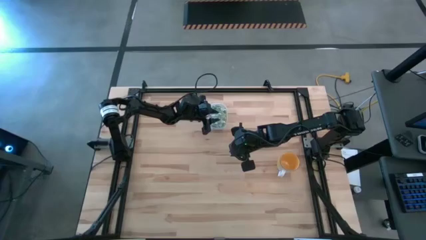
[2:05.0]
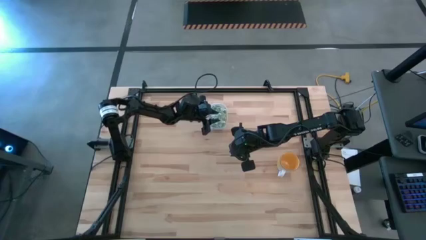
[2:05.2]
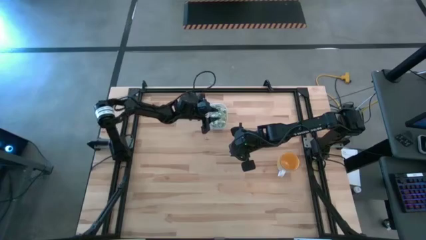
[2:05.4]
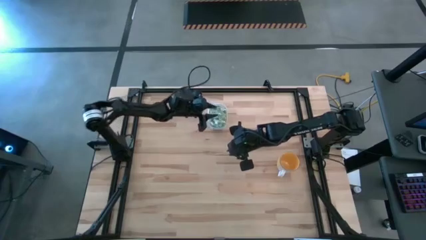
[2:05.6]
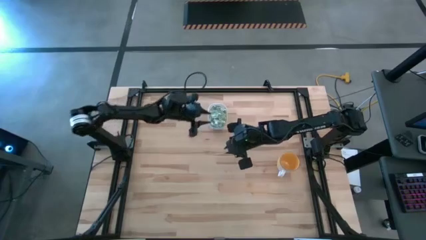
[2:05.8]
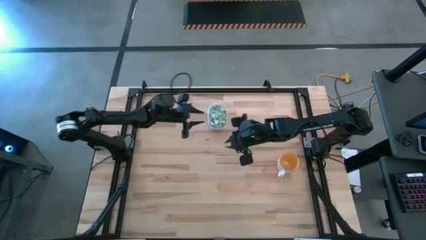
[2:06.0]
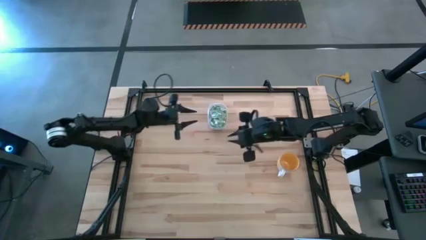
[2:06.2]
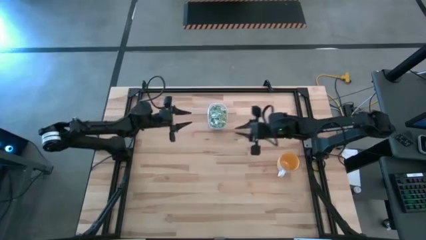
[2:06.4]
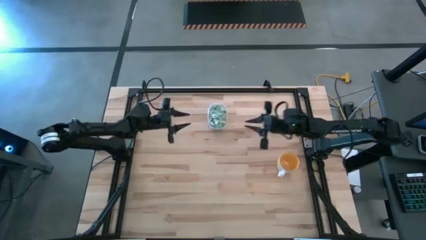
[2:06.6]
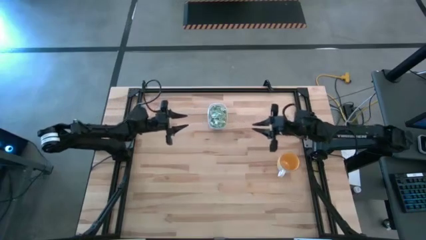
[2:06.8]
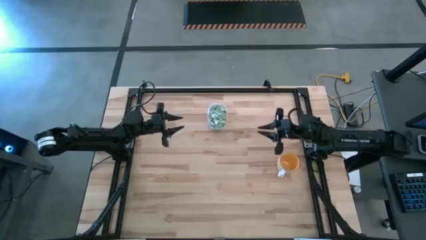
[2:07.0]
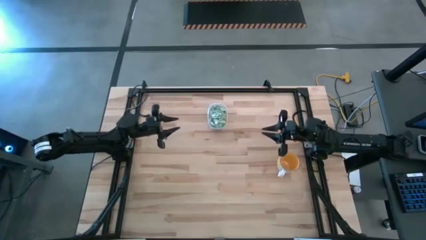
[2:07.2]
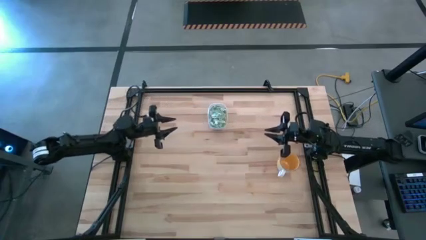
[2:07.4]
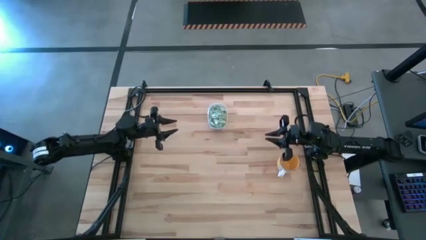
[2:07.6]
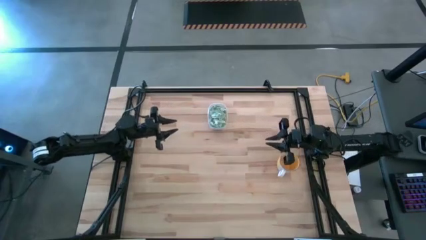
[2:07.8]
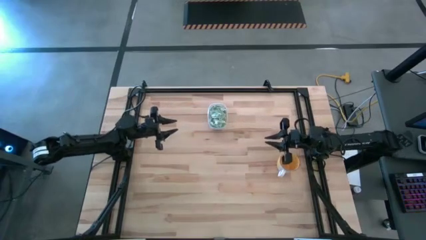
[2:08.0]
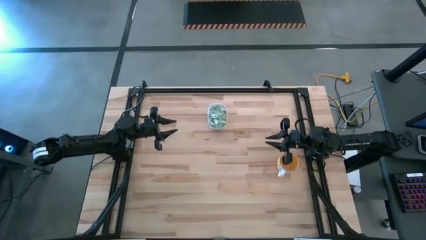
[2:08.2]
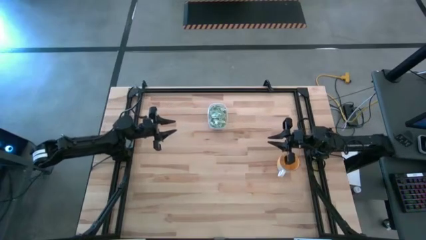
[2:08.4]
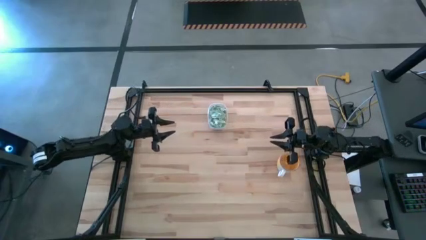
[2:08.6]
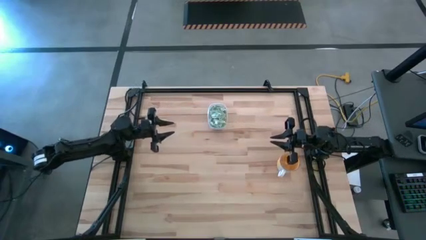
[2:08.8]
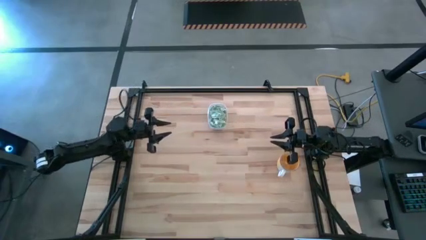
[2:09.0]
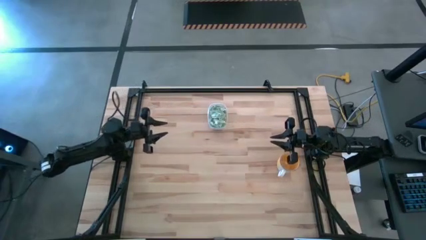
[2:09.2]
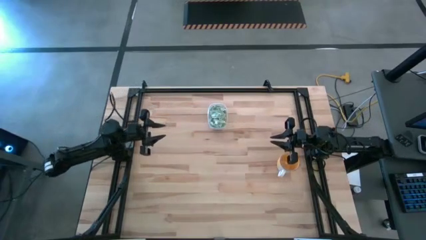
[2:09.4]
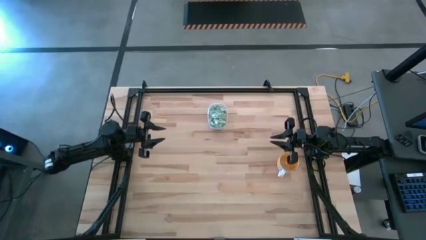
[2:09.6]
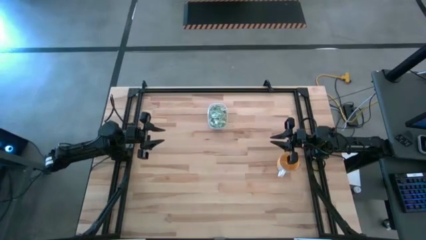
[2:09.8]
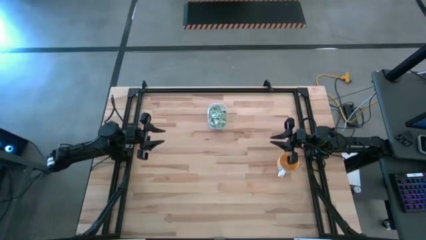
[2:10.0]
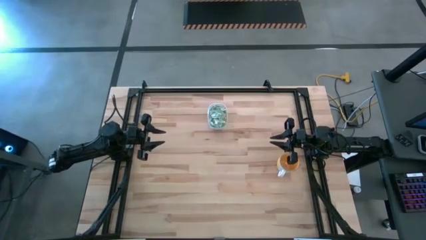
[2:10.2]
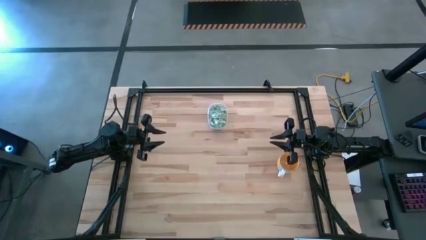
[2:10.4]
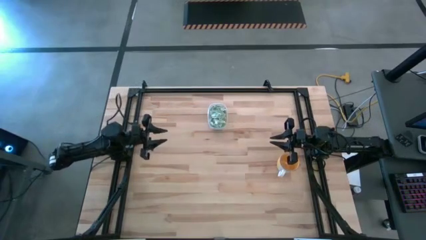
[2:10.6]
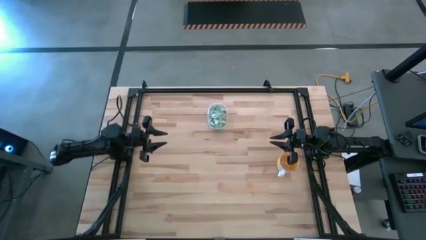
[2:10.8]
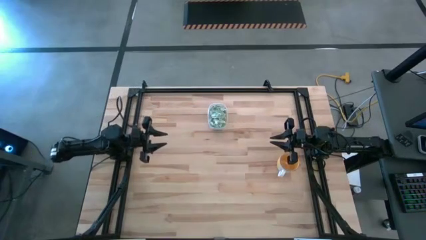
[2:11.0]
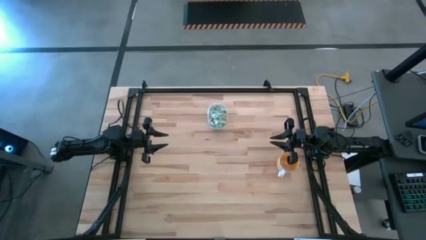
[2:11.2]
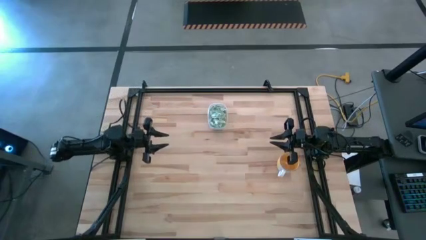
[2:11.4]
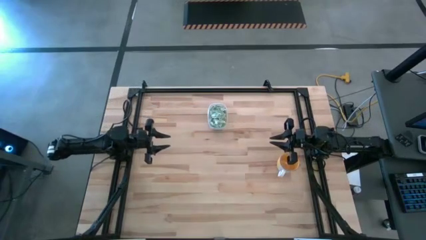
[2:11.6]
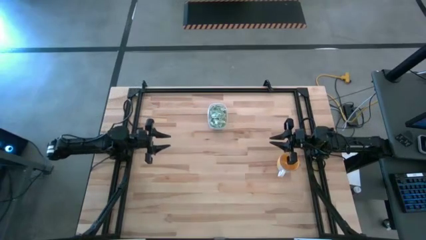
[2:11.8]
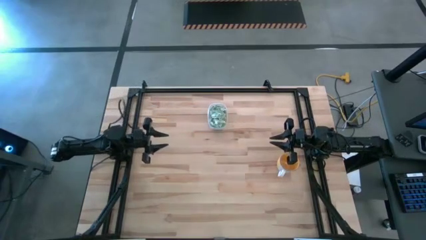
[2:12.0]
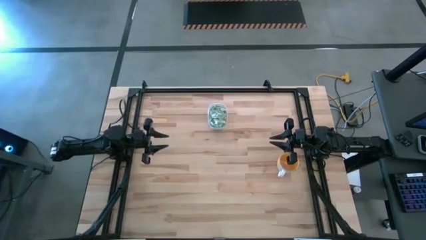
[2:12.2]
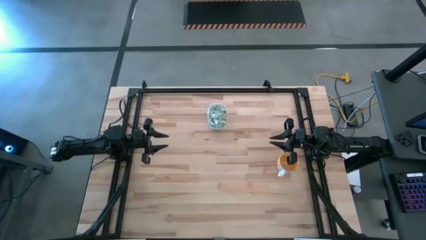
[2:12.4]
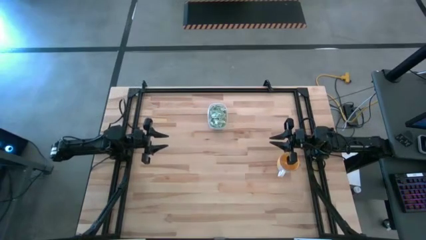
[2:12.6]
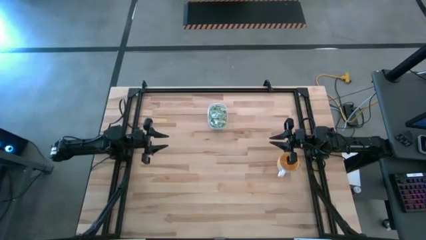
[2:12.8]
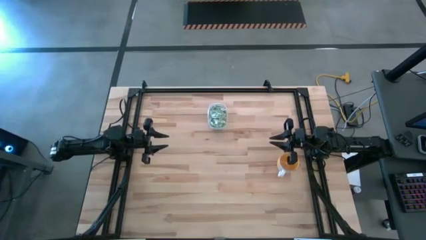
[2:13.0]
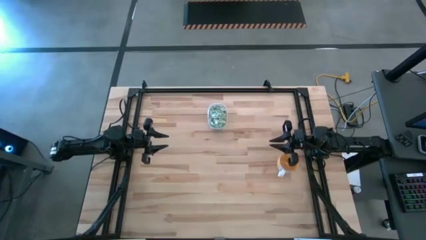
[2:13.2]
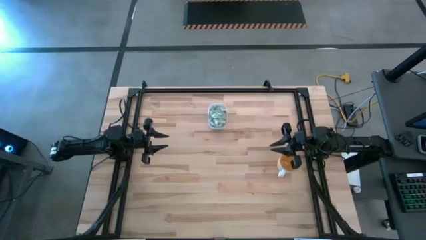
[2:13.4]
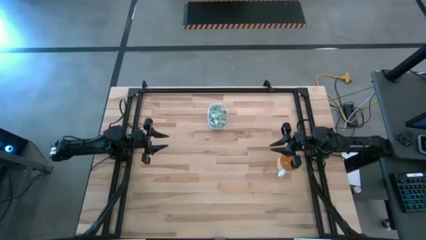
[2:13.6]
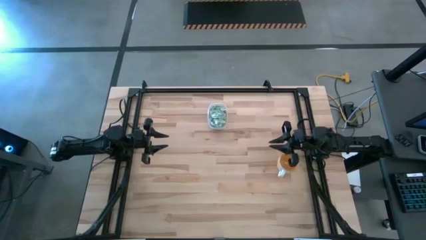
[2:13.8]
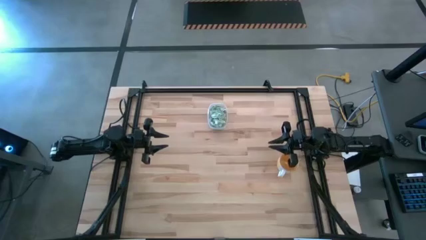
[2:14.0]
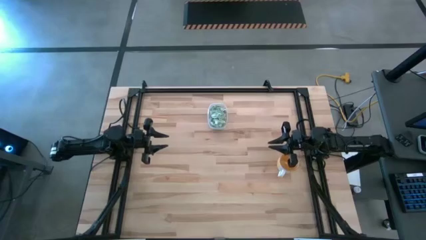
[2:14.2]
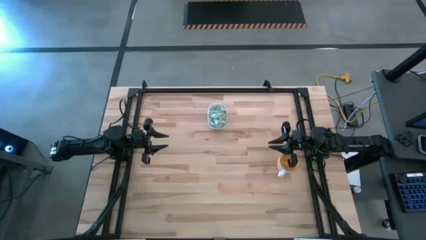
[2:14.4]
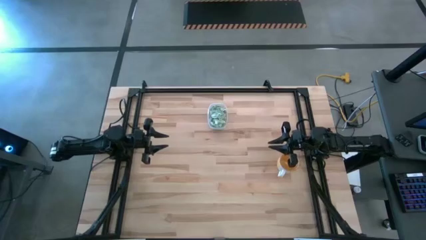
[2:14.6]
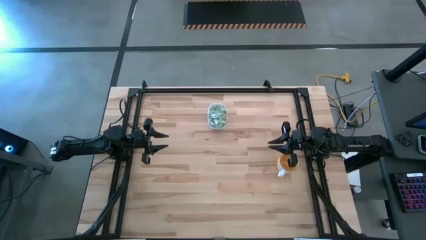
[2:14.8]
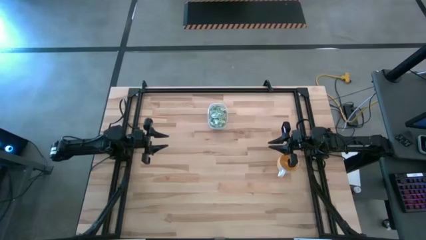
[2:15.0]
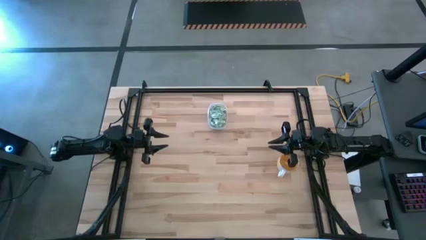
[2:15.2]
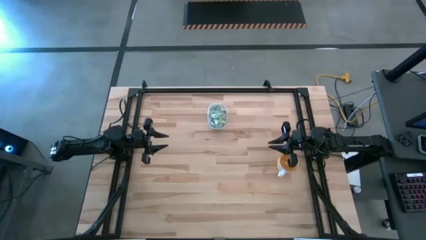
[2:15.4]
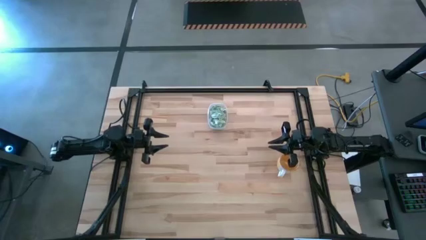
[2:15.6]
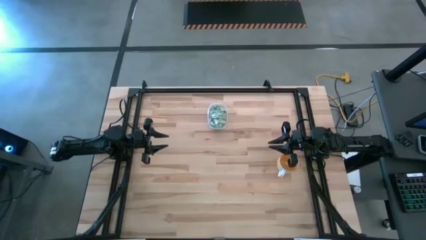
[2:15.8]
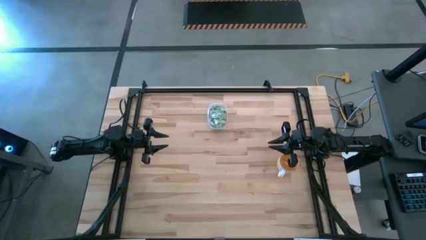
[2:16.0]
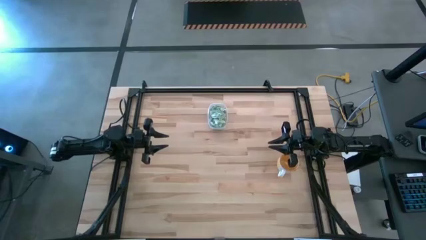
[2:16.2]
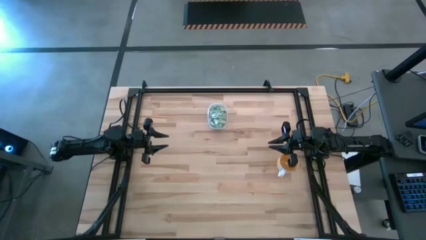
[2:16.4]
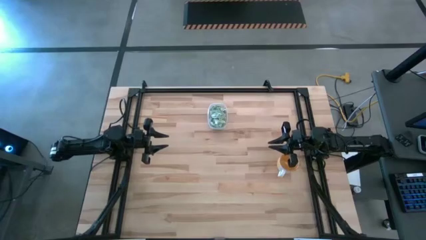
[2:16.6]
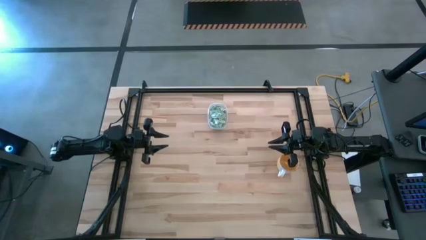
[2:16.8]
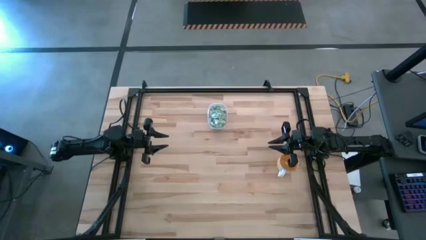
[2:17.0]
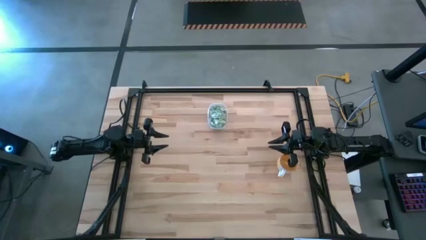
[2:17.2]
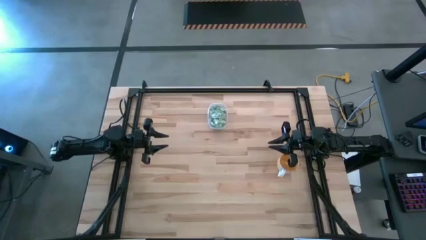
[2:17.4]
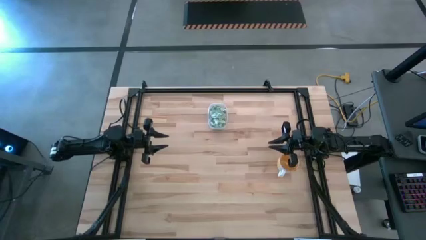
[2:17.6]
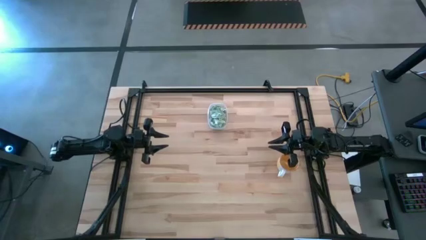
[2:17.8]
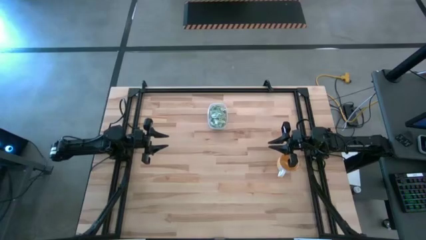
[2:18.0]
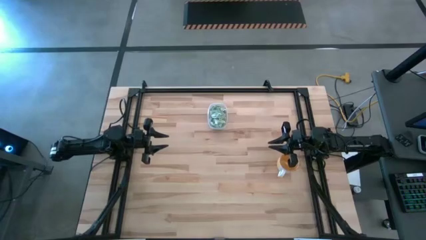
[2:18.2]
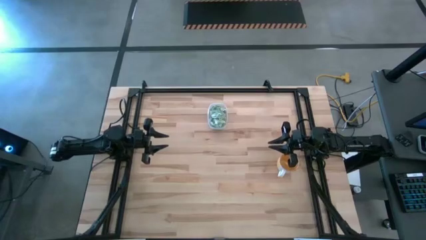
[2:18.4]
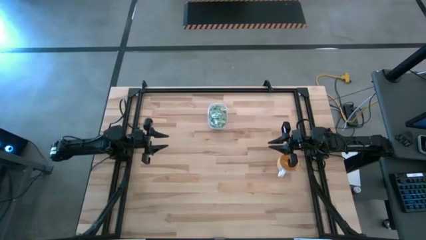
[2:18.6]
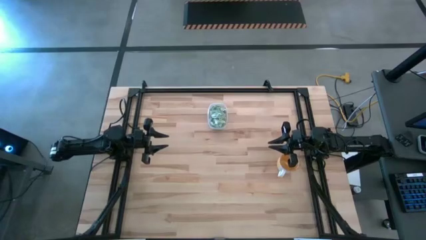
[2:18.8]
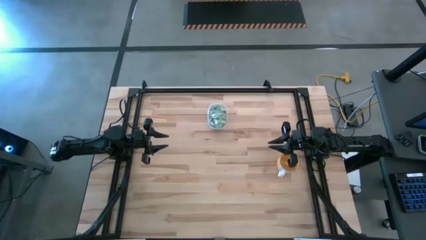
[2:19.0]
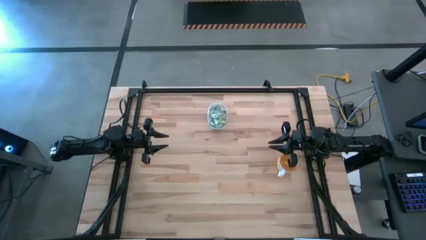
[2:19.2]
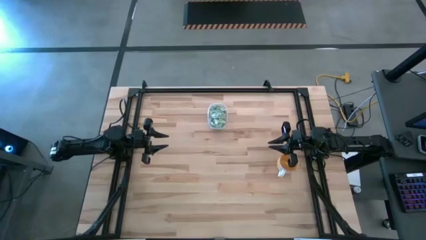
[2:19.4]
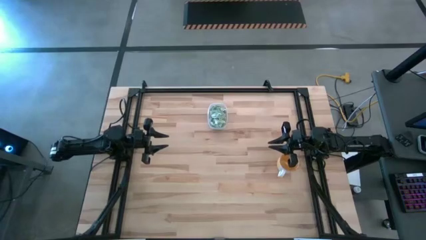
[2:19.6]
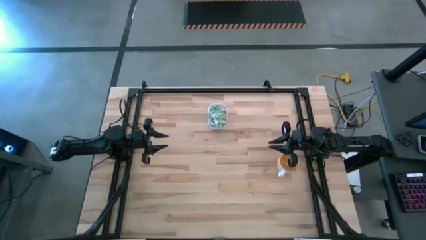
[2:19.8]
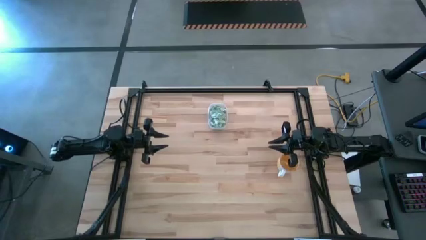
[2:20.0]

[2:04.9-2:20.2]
Task: Pick and place Stevia / Truvia into bins
Return to Home Position

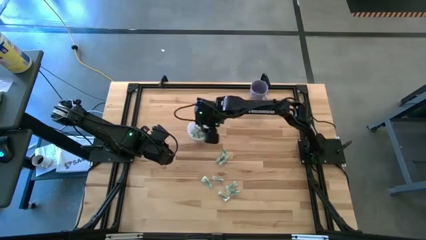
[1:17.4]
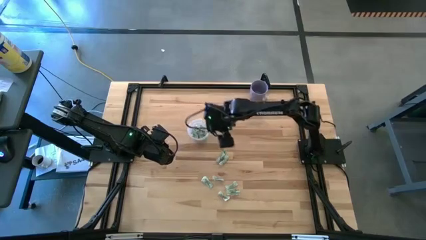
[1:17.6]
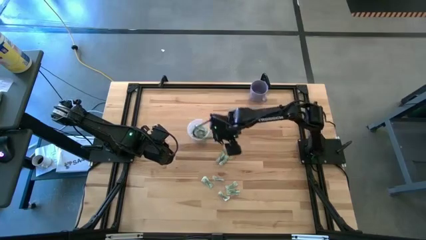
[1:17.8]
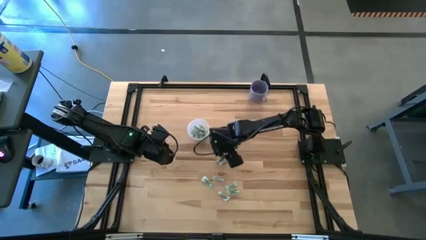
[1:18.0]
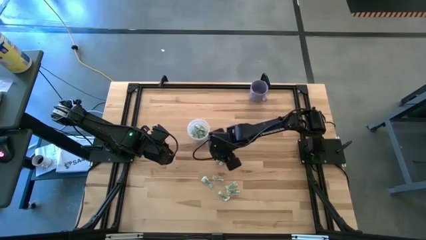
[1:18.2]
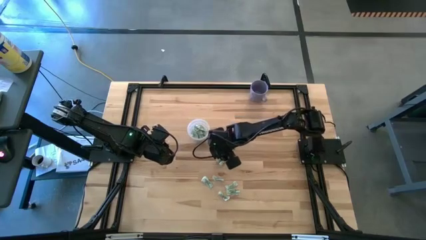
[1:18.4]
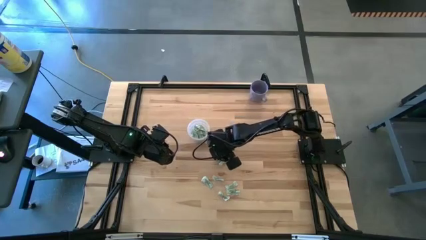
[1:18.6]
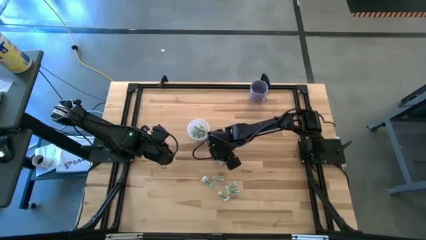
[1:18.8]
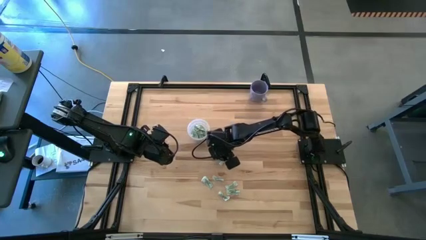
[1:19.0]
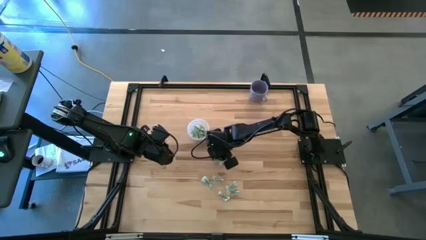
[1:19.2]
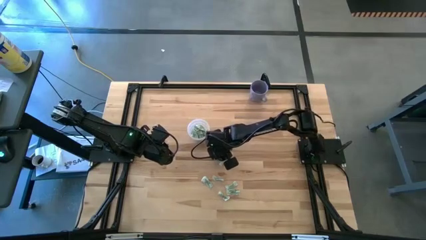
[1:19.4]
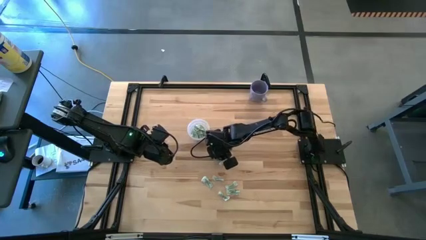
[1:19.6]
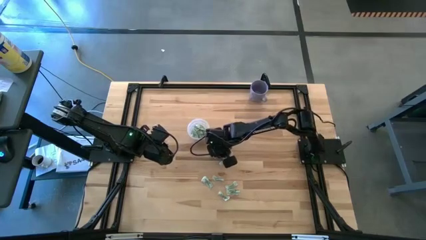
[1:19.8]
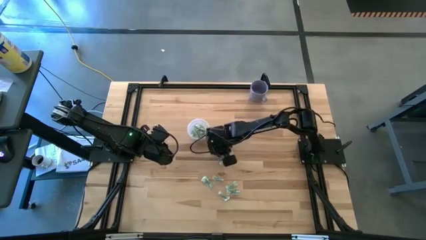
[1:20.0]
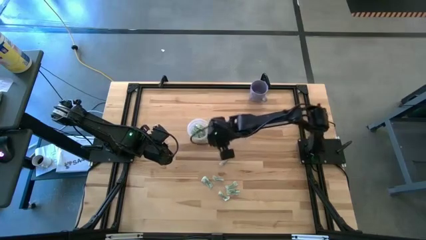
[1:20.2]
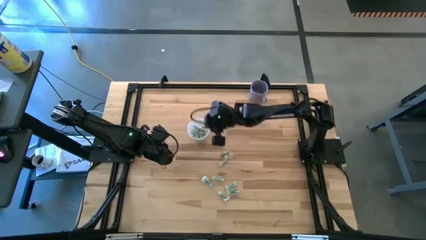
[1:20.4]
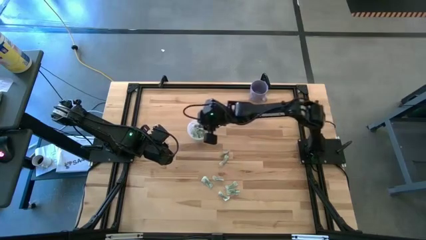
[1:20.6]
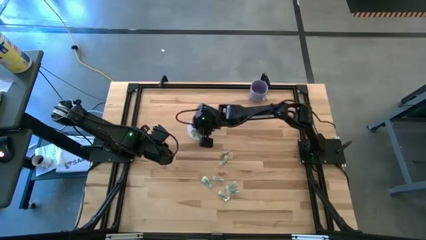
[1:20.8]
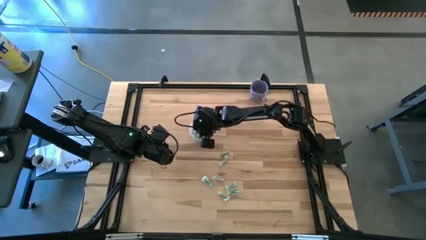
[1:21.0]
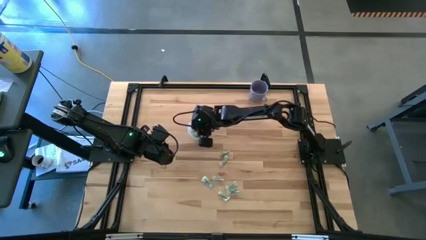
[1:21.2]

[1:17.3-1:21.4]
Task: Pick and place Stevia / Truvia into bins
Put the white stevia packet into the transparent container
